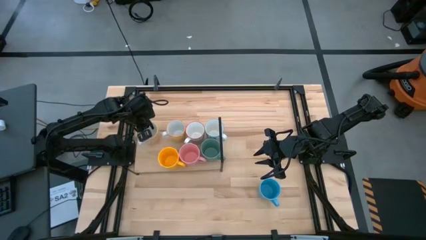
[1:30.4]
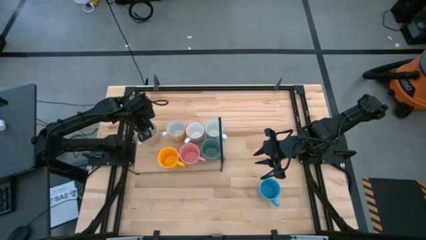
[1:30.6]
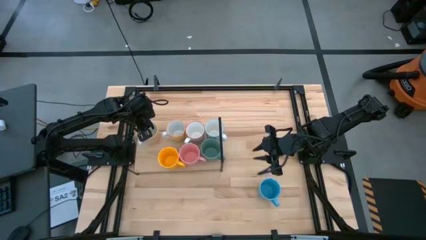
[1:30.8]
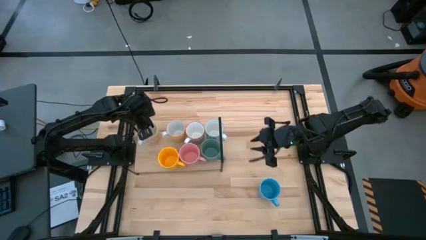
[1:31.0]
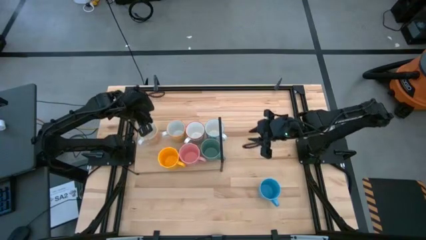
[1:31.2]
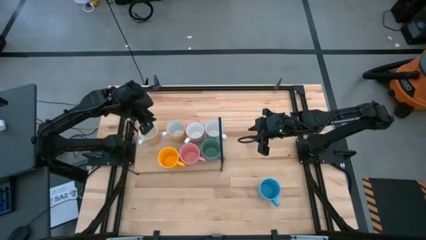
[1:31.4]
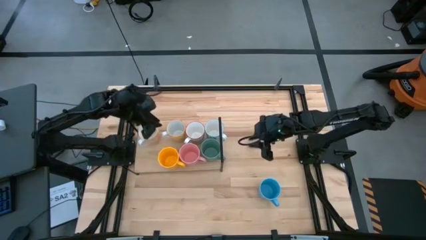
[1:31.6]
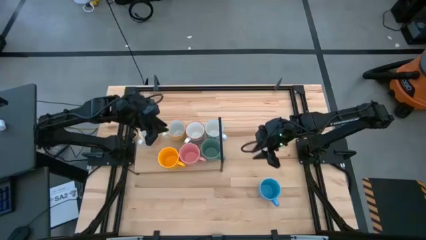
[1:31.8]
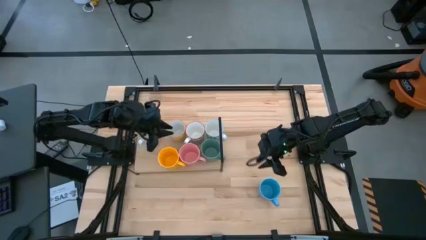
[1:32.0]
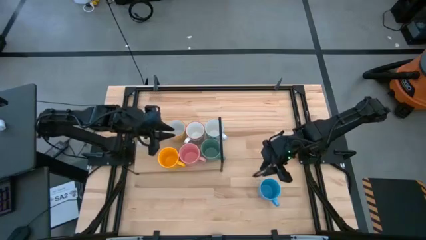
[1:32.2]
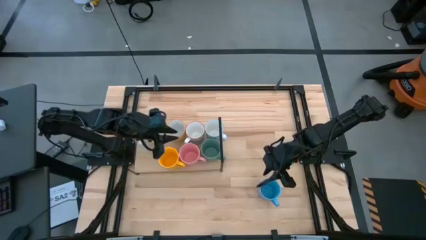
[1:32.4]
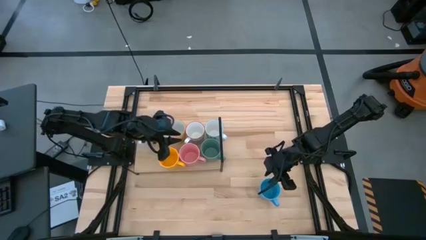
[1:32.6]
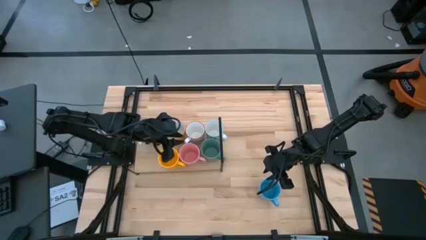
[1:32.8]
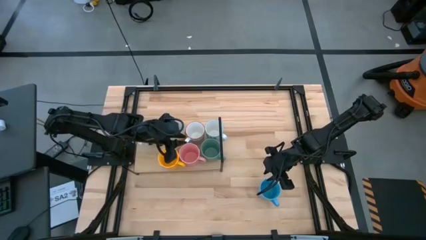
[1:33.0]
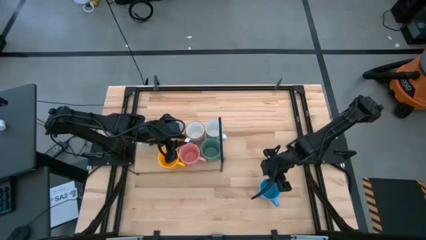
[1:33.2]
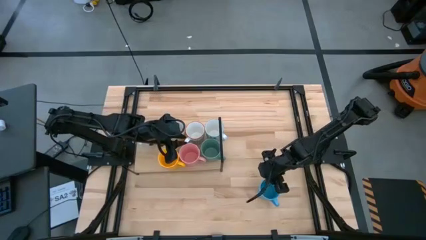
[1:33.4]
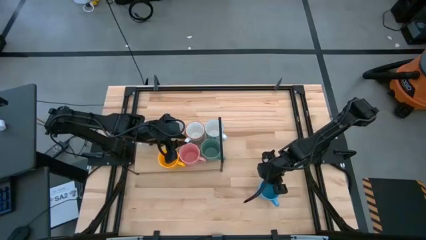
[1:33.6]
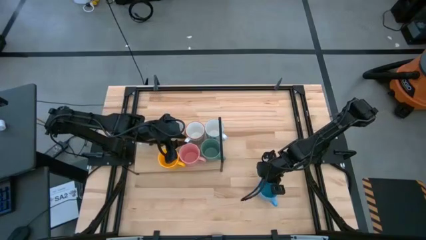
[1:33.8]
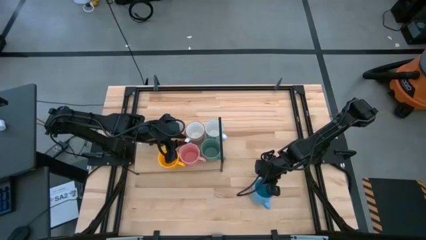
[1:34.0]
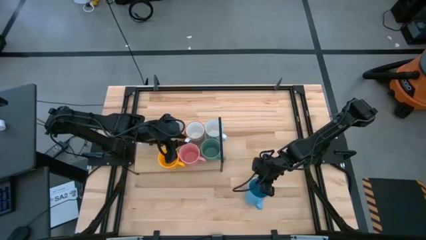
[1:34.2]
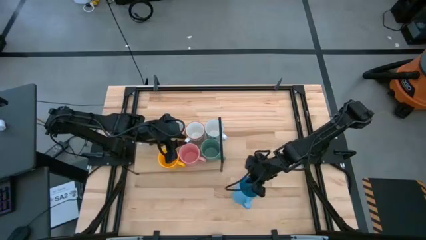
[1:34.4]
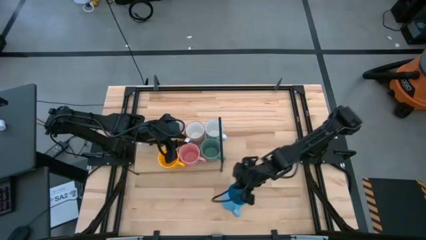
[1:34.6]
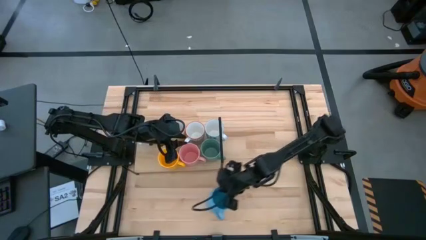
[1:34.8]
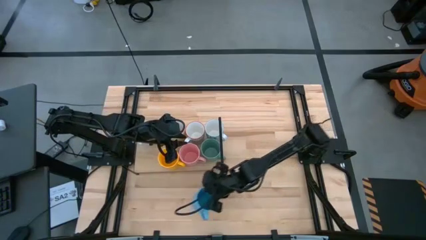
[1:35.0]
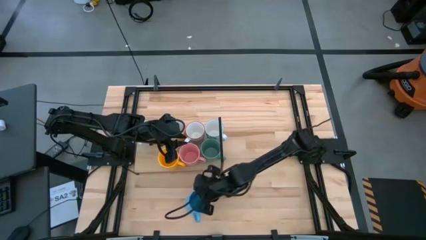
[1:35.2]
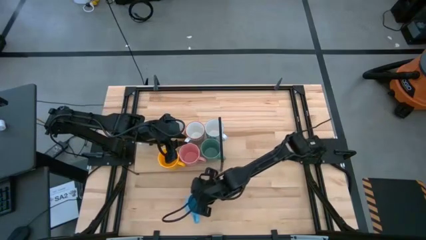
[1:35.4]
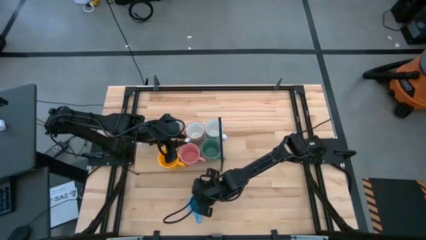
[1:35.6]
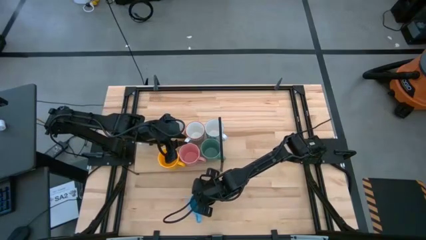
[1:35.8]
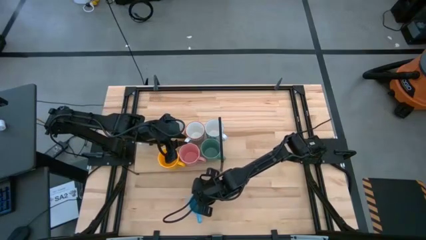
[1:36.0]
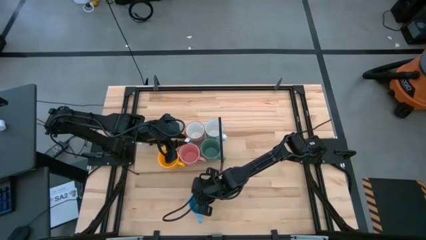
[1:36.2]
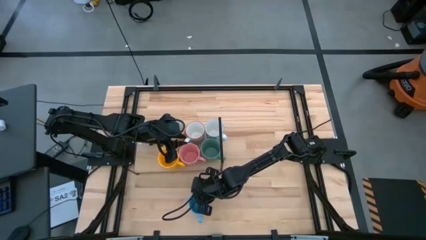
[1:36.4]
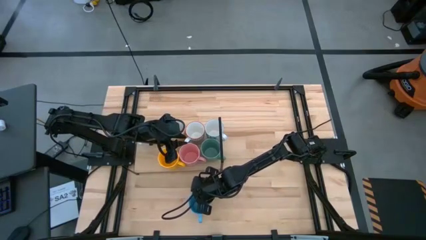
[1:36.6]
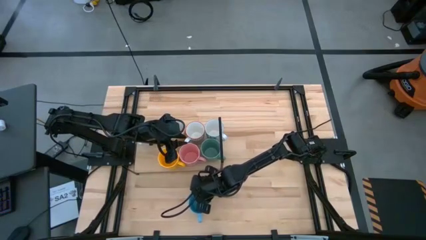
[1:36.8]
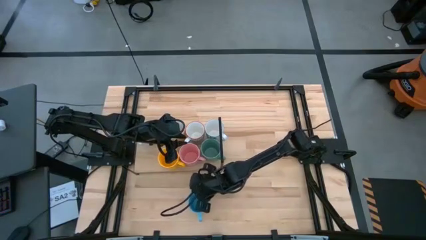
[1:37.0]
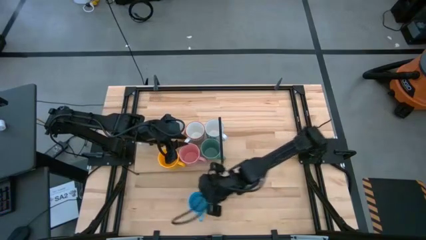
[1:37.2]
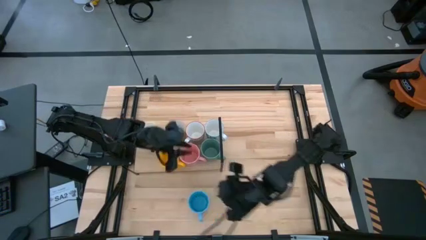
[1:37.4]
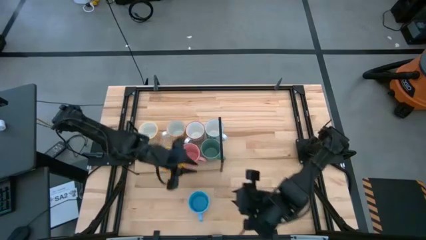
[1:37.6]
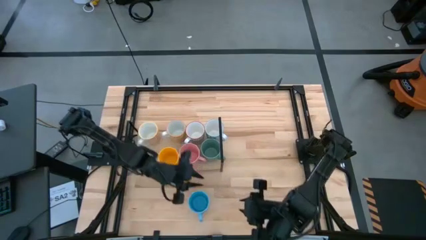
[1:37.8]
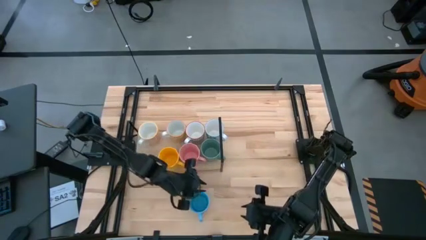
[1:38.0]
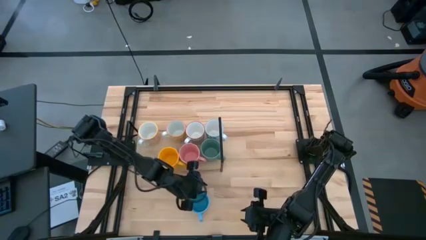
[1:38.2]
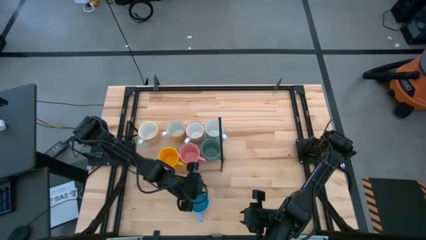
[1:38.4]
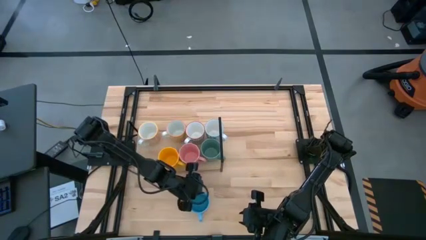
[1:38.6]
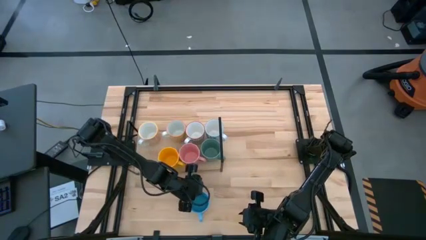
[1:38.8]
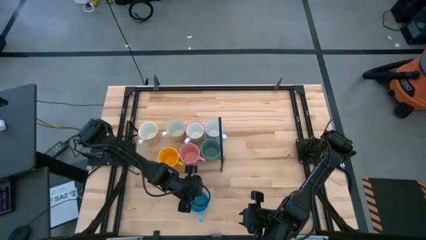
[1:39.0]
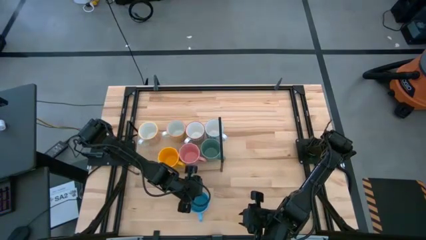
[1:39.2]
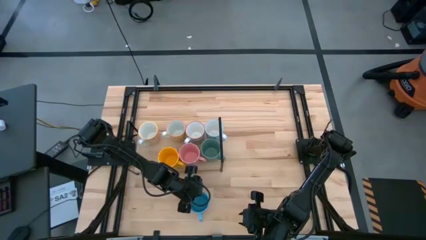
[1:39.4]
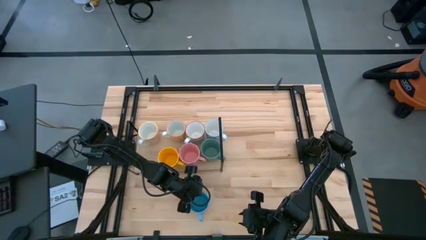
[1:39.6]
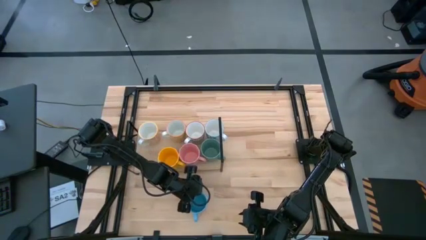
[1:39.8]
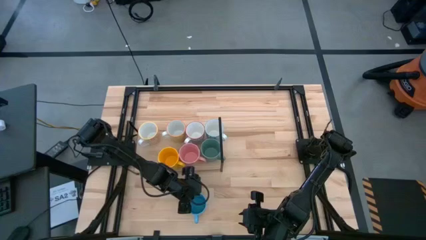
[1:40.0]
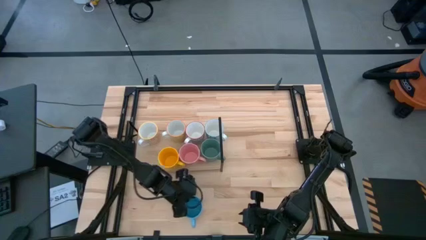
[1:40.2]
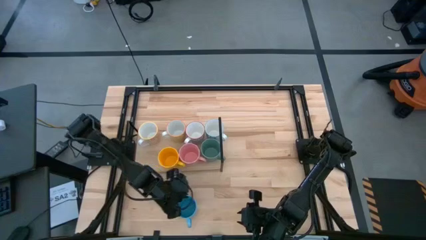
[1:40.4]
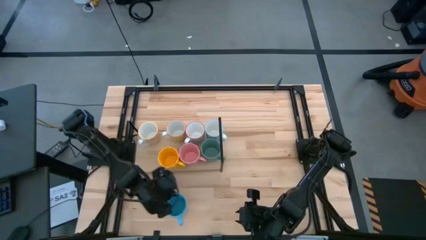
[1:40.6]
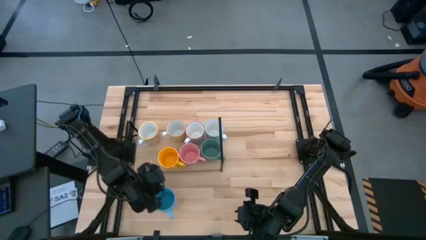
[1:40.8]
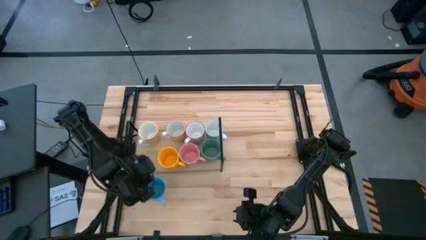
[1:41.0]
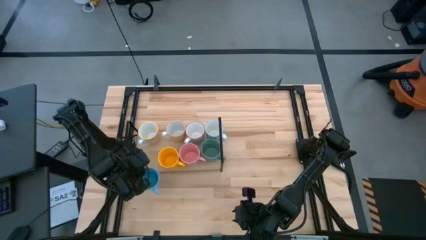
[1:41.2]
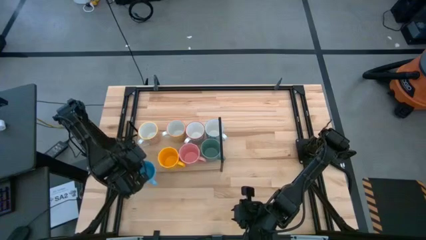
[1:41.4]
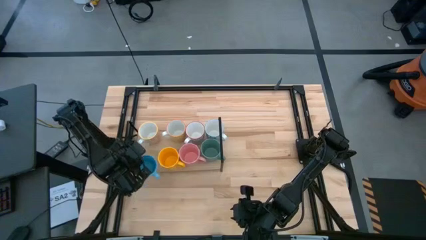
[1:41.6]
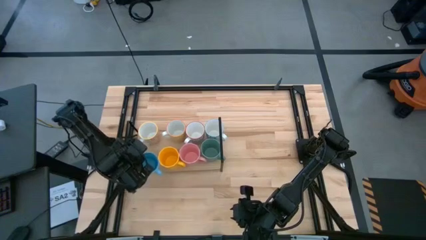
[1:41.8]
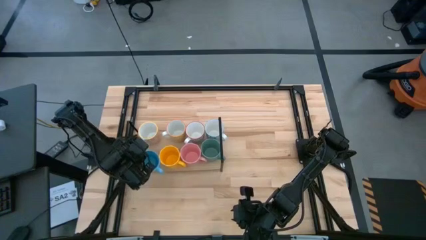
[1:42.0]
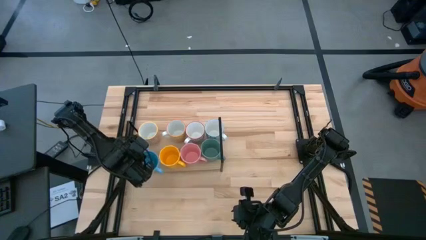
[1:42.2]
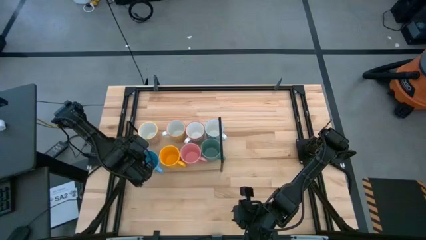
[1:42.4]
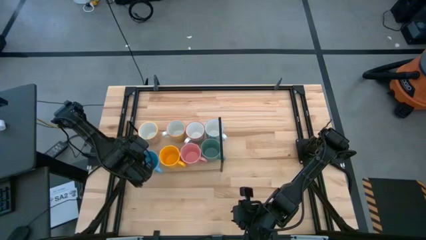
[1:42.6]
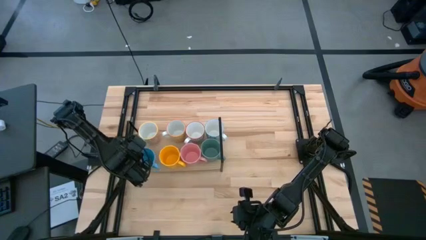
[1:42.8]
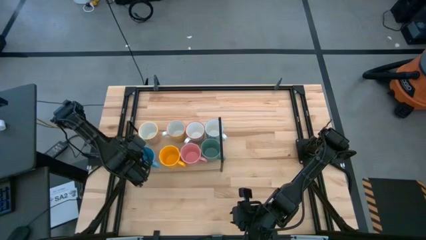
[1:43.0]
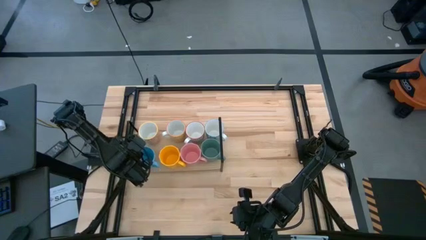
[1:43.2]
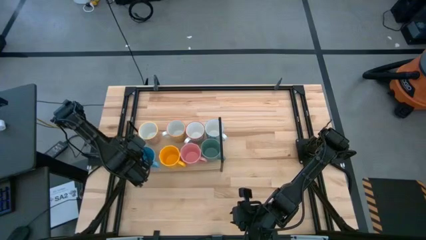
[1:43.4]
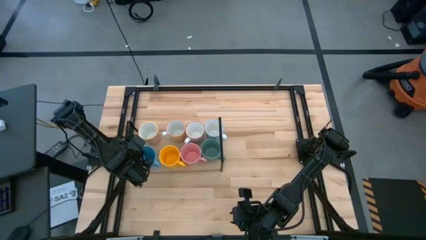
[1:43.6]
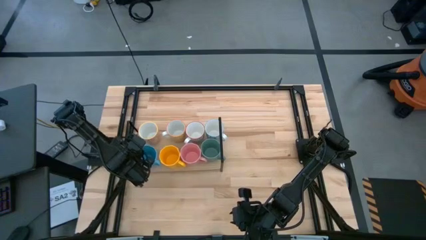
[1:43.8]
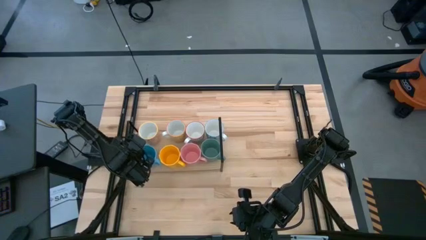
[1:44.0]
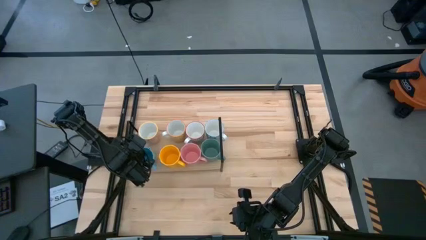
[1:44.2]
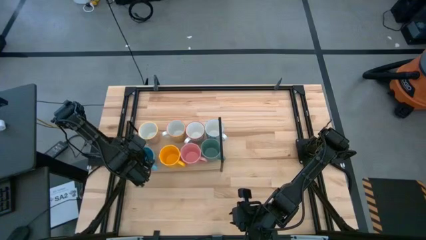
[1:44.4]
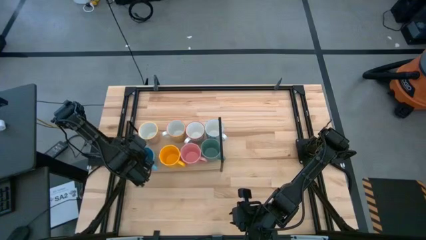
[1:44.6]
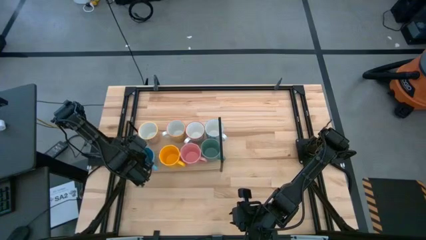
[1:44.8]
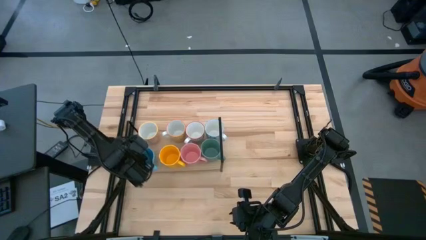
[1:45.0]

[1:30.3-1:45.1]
Task: Place coffee mugs
Put the blue mug on the shelf
